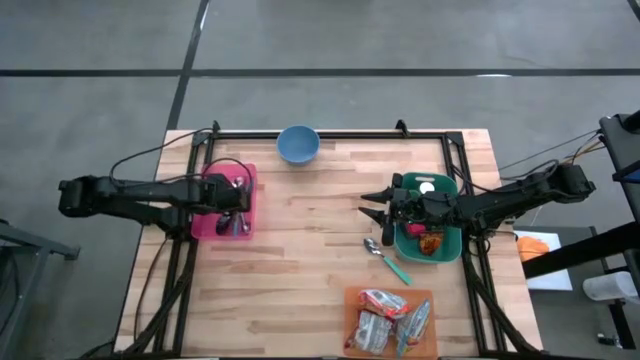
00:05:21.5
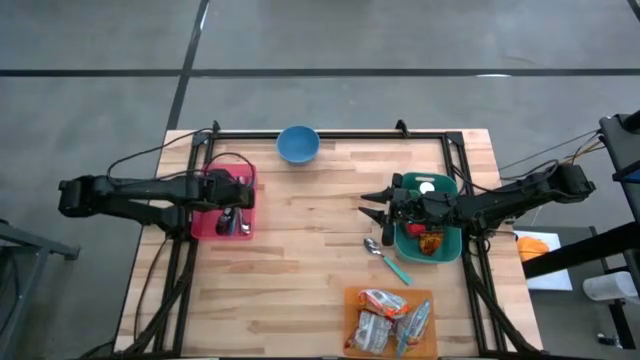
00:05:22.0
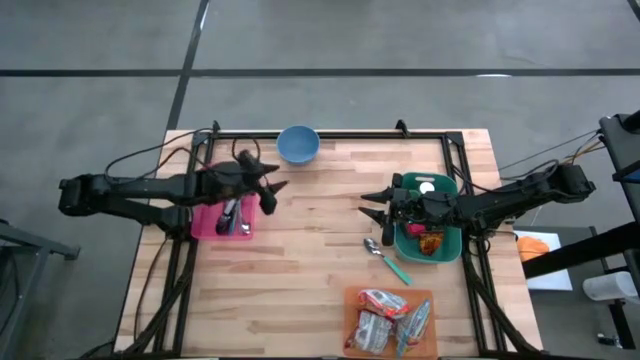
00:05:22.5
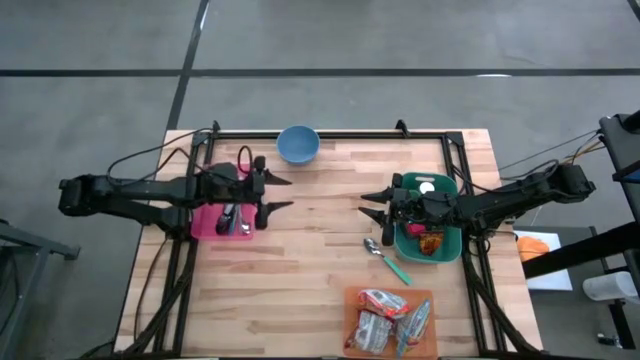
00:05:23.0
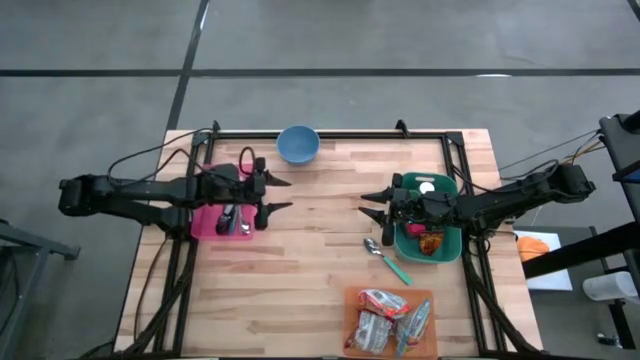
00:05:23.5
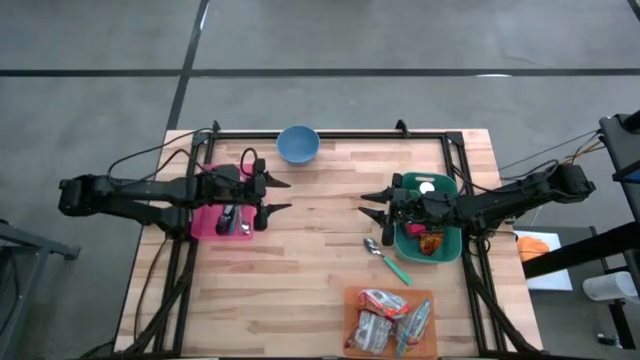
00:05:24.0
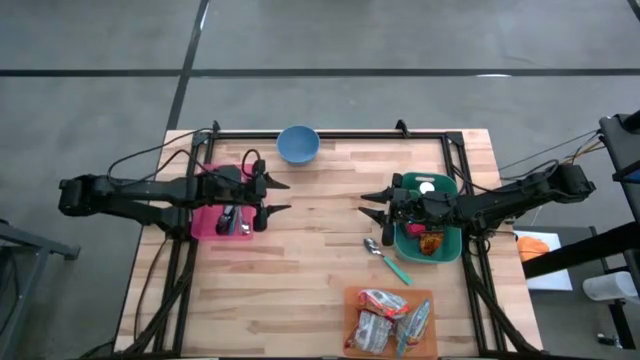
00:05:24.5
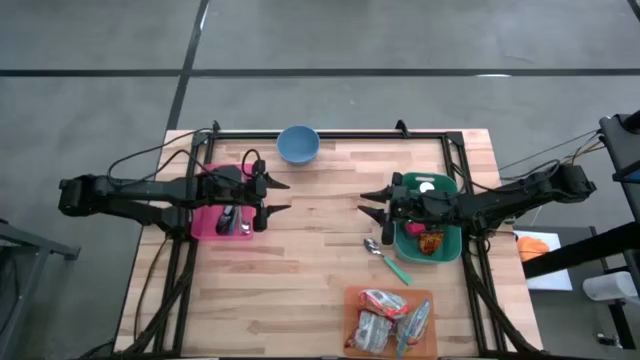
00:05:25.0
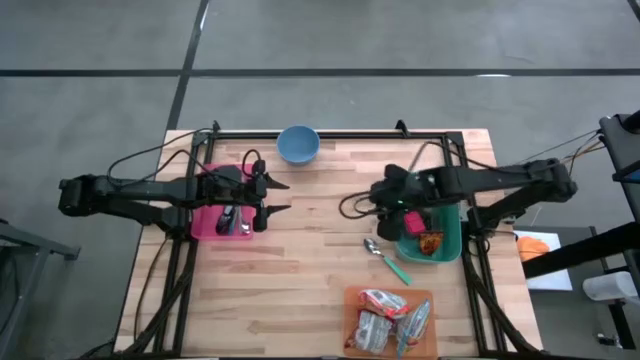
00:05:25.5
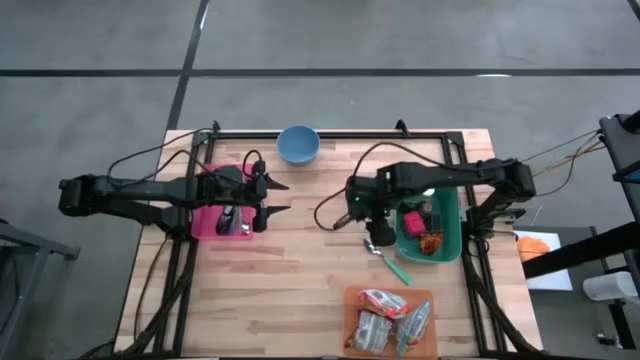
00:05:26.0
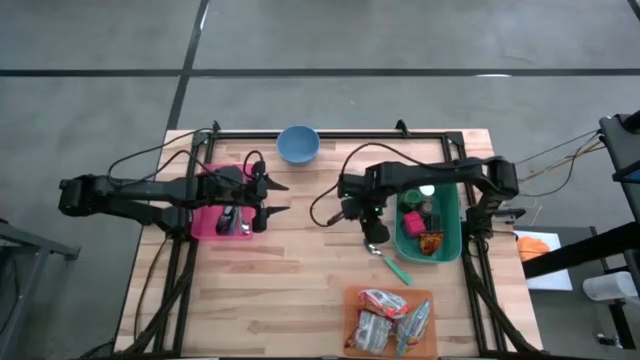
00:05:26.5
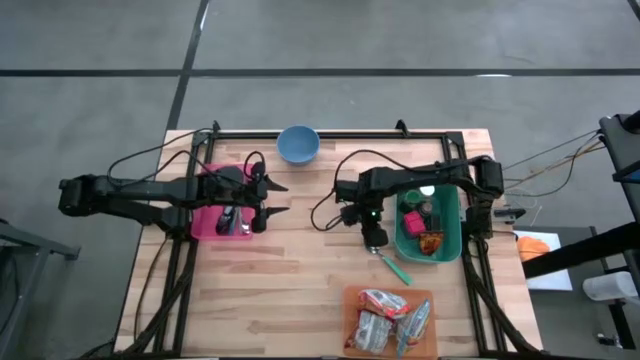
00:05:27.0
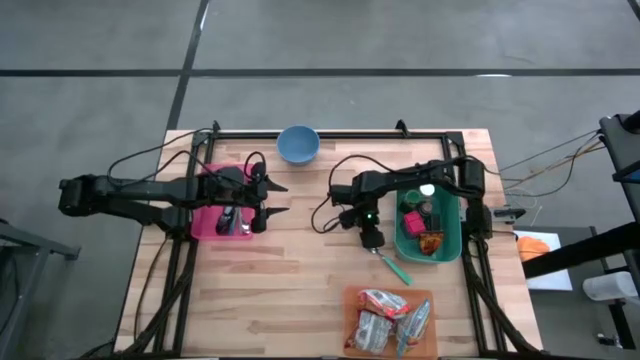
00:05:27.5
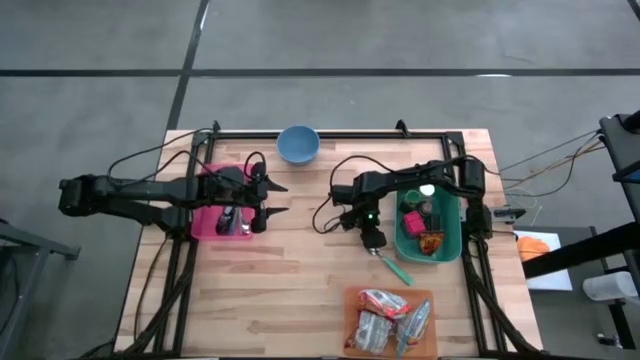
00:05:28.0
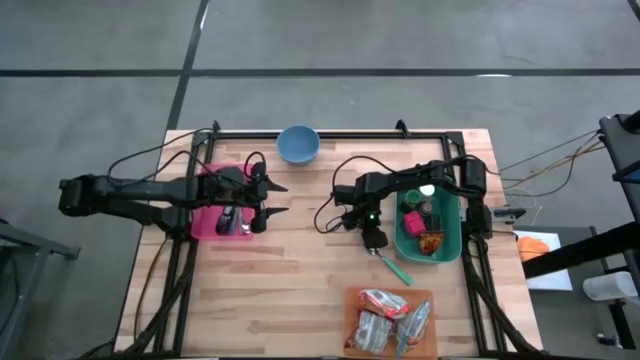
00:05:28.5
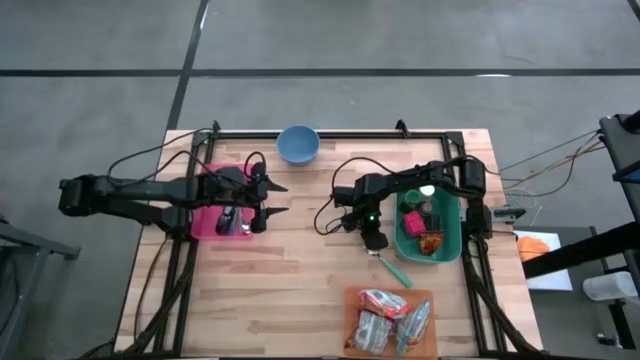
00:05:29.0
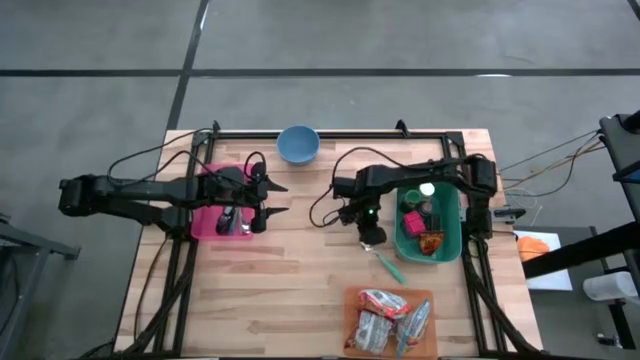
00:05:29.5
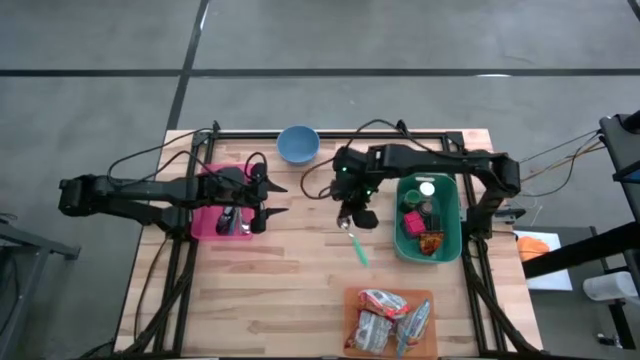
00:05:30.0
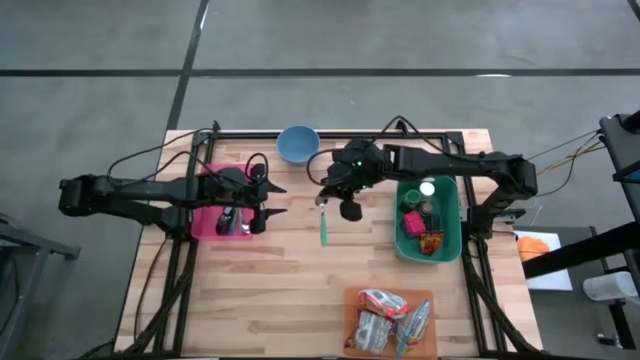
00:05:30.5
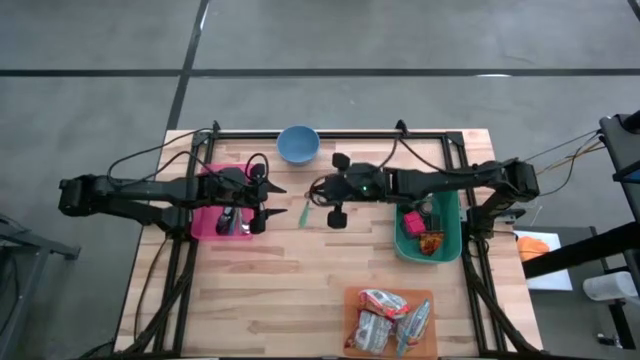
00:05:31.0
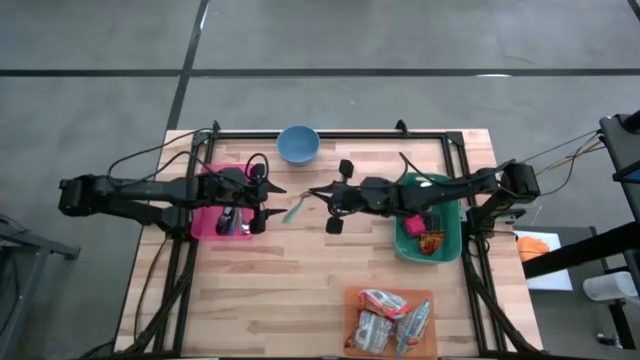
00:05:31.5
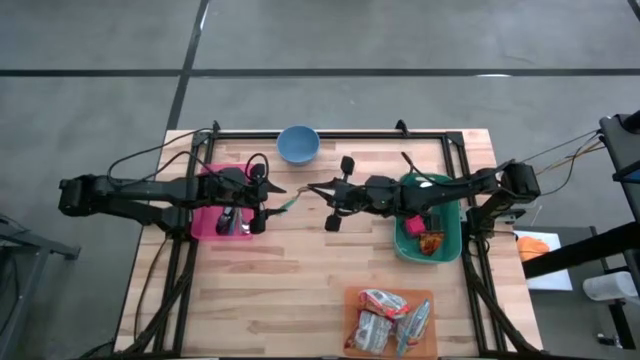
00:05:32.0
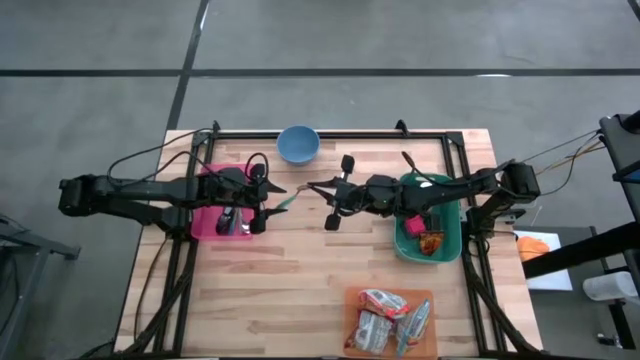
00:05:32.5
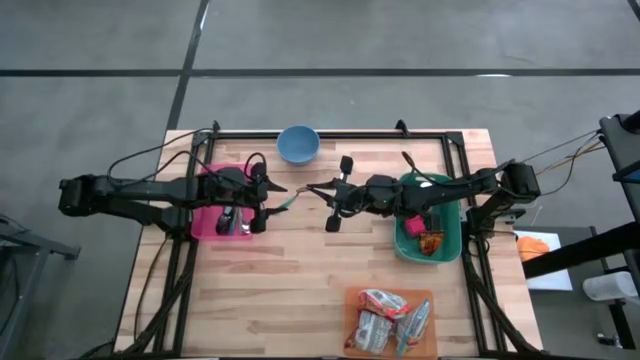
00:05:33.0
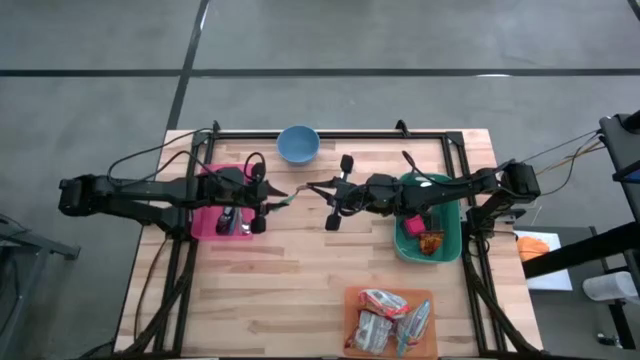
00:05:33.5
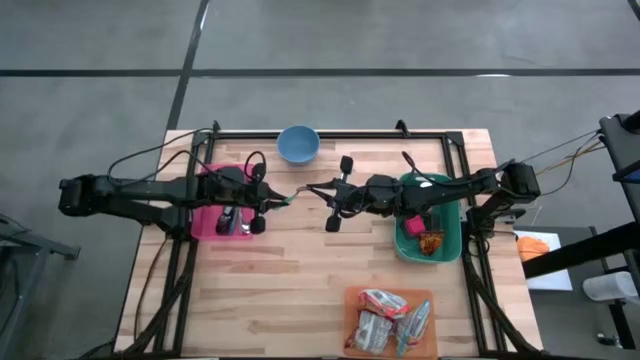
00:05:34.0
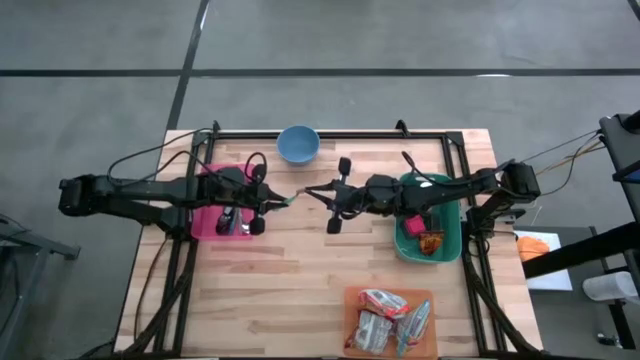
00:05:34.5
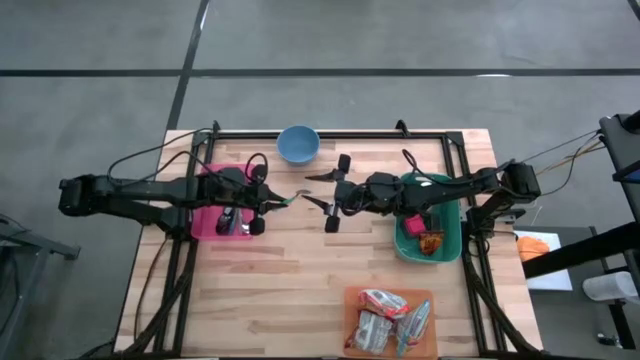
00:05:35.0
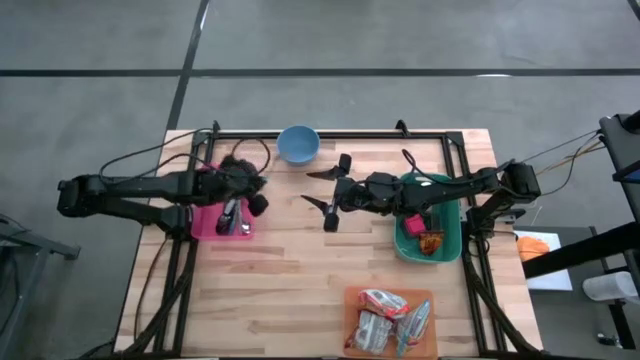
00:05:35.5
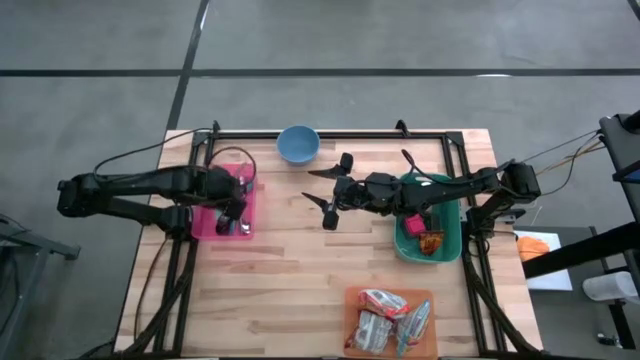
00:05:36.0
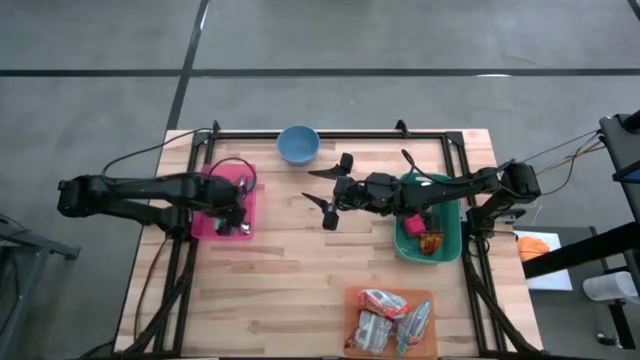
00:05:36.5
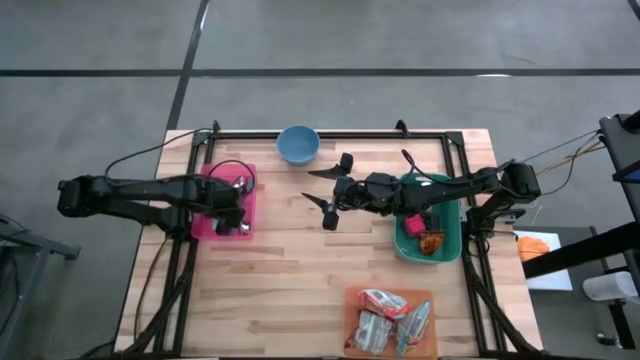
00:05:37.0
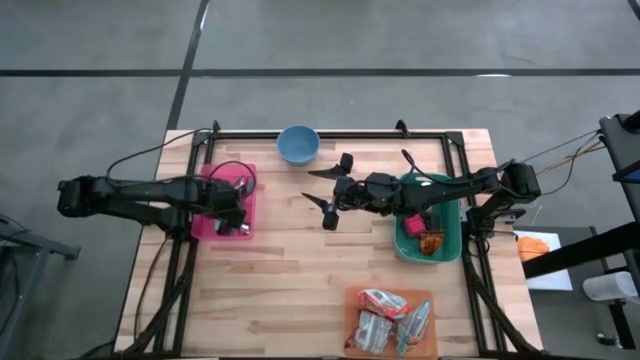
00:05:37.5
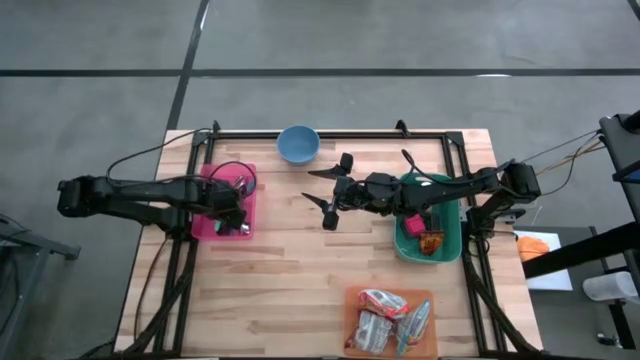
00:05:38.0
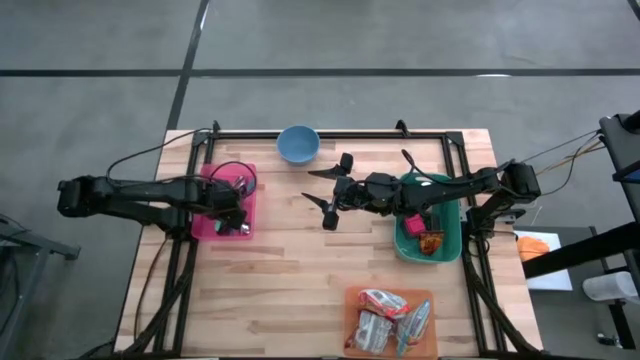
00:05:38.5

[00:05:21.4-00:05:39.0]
Put the green spoon into the pink bin

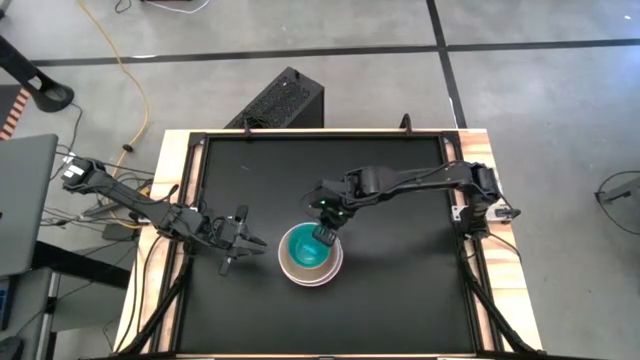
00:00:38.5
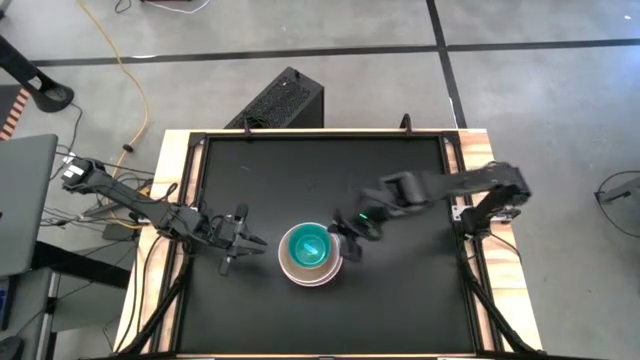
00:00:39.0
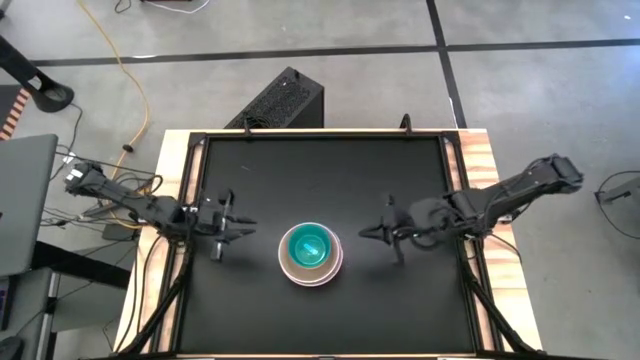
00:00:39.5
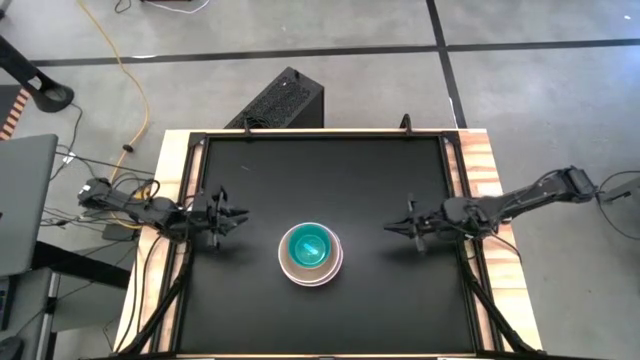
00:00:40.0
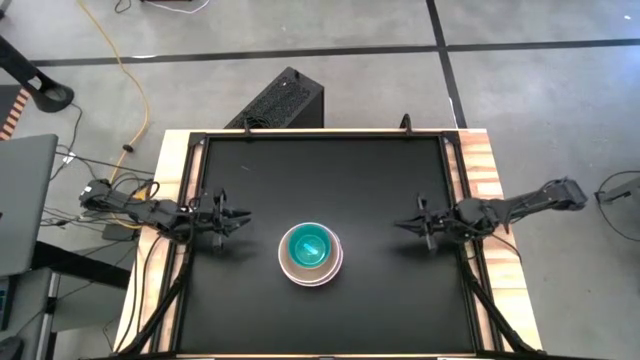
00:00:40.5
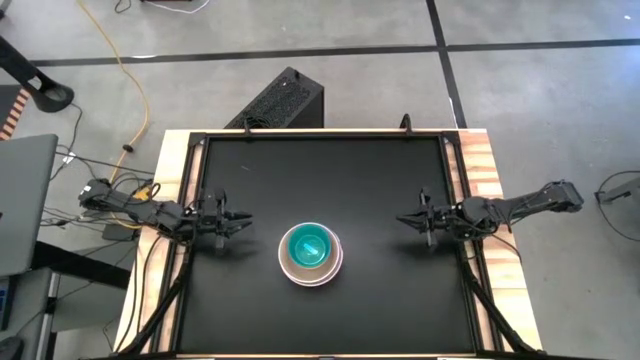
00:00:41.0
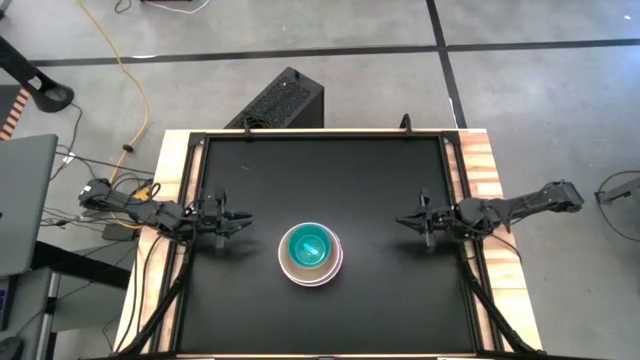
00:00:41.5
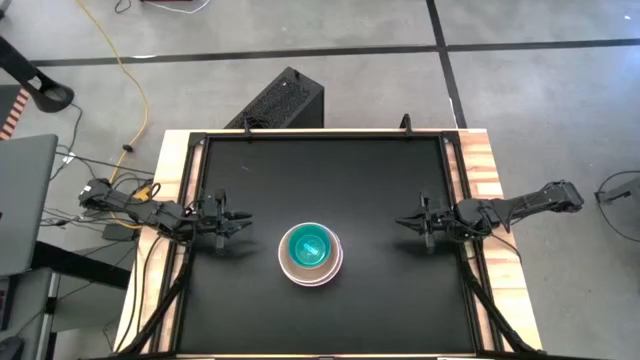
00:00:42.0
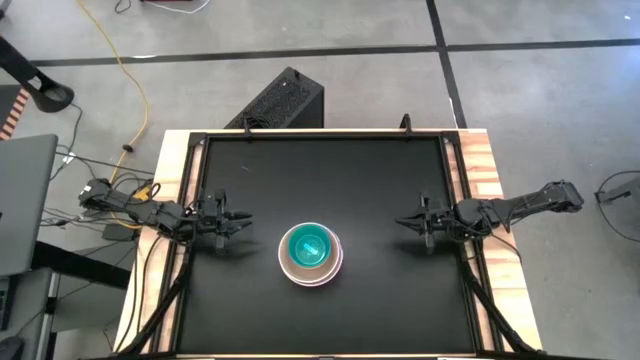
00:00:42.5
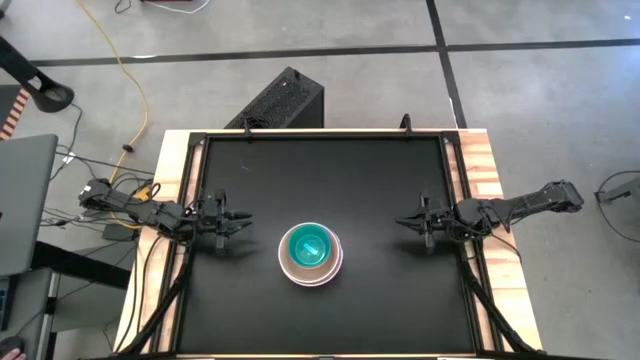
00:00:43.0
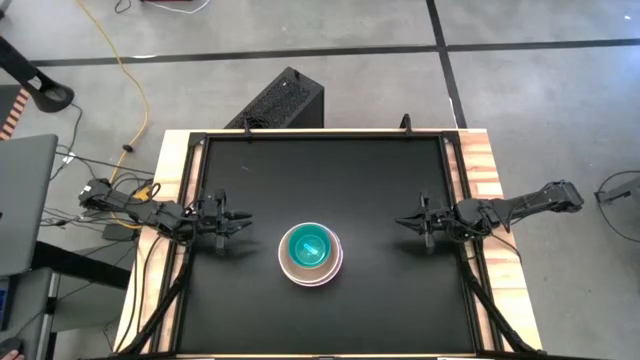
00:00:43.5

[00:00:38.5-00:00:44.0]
Return to Home Position
